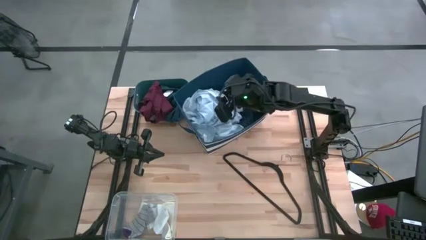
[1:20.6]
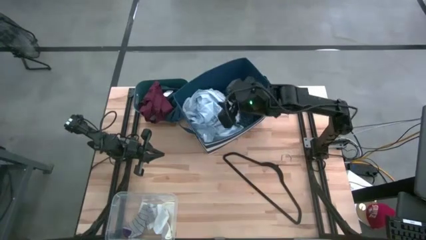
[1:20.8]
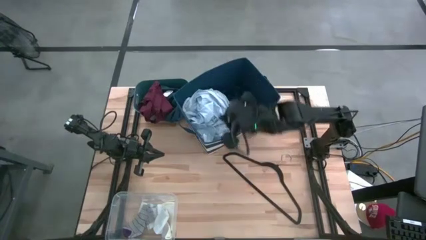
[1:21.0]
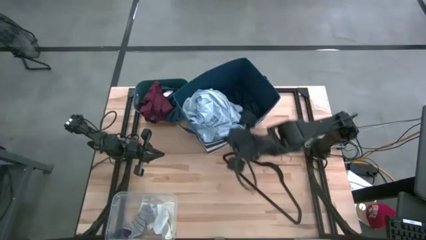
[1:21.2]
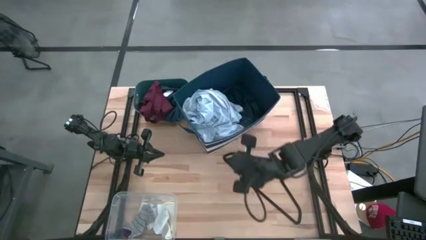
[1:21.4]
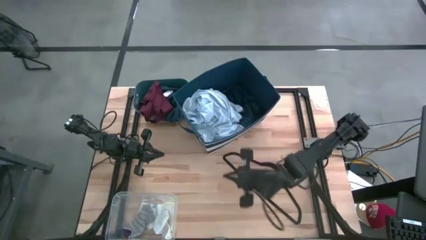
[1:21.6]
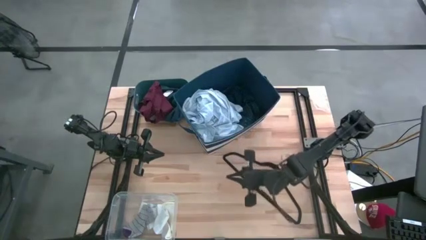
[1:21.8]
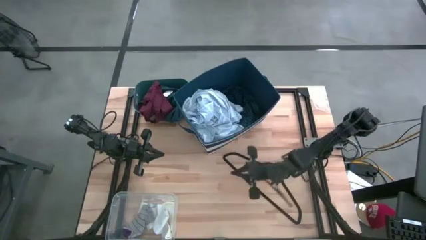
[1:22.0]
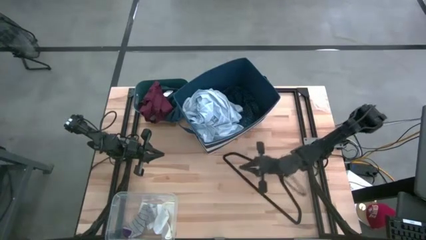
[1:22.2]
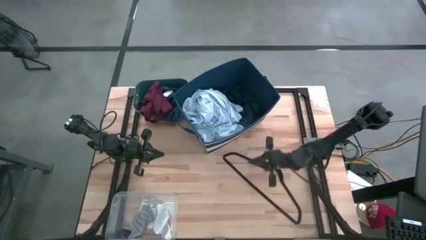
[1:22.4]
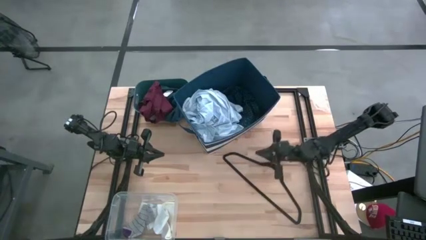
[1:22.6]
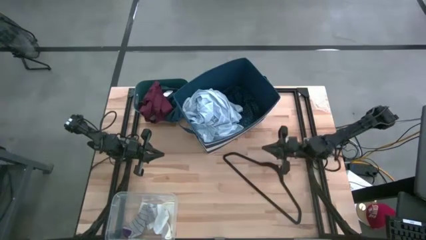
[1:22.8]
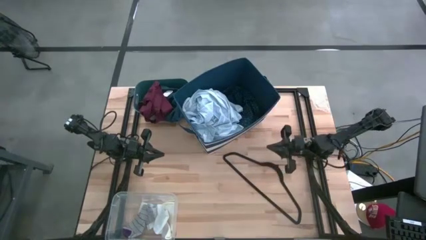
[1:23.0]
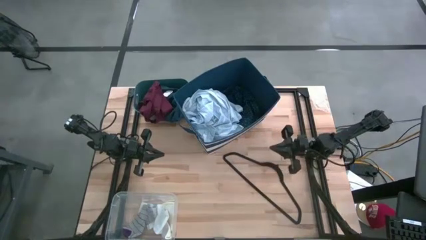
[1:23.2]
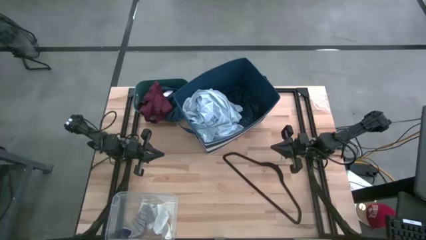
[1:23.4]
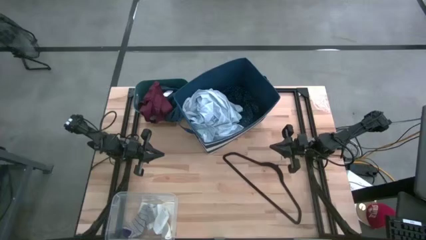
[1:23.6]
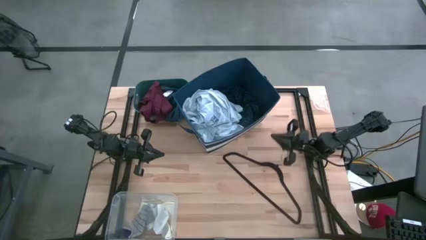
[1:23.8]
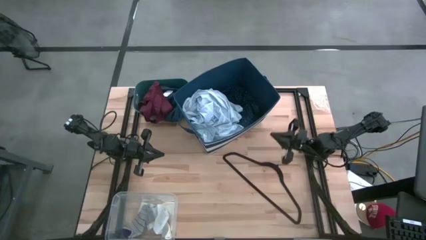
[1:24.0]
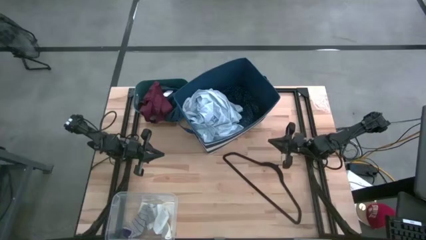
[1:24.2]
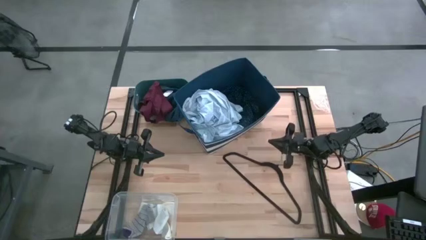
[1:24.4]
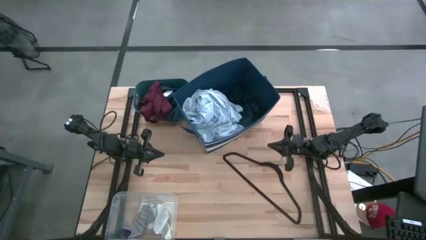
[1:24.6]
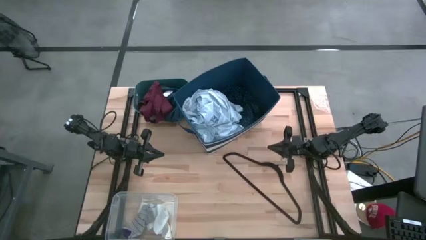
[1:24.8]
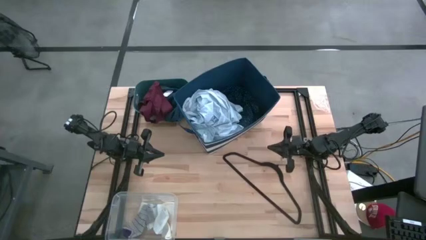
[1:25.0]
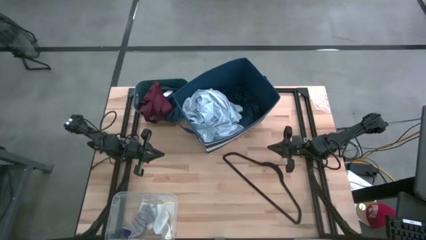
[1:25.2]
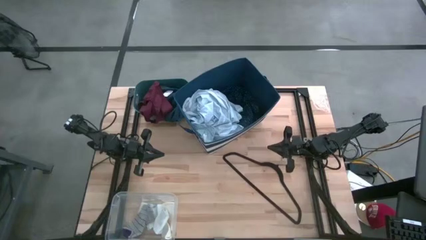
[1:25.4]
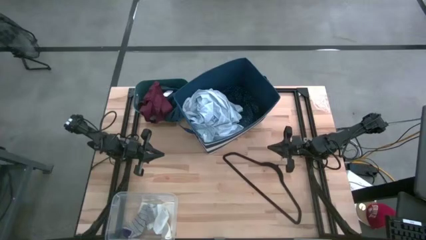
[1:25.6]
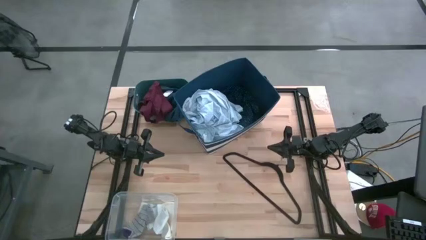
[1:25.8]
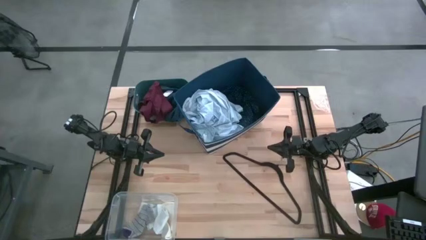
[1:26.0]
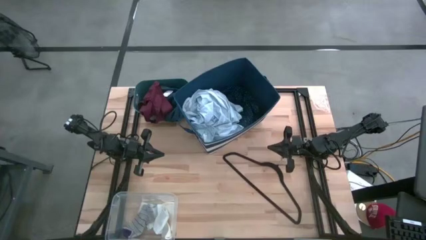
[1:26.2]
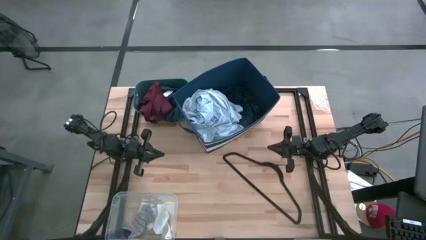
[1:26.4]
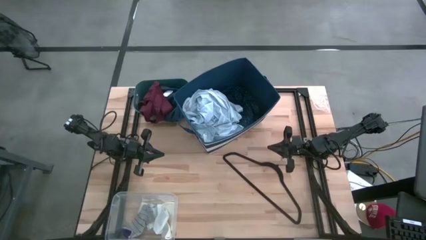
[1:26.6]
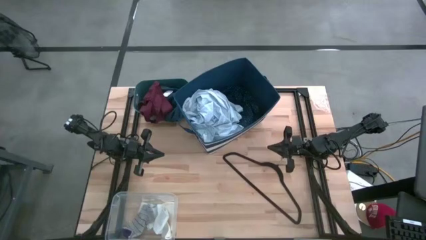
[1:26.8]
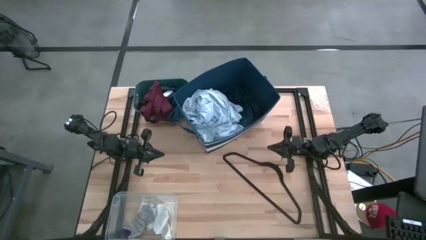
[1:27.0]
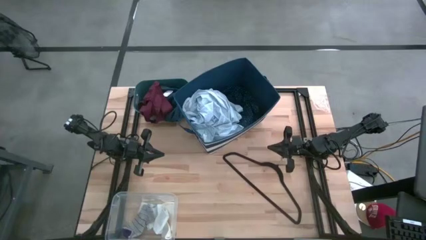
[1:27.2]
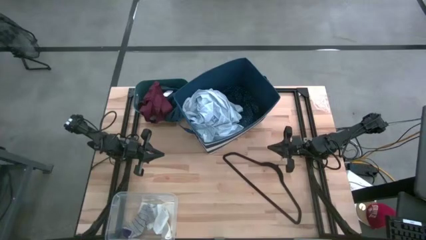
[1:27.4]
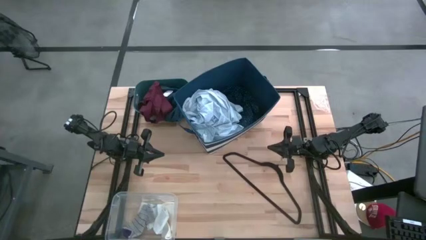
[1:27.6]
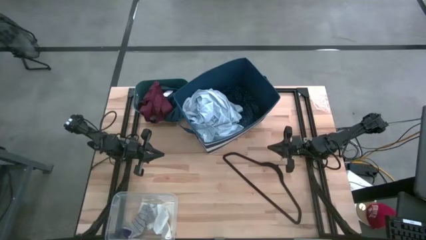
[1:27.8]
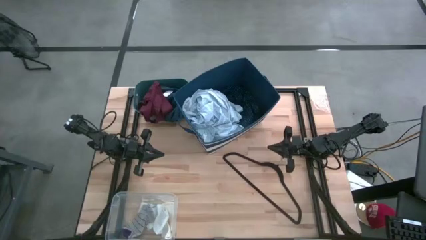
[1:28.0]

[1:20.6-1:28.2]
Task: Pick & Place Cloths
Return to Home Position

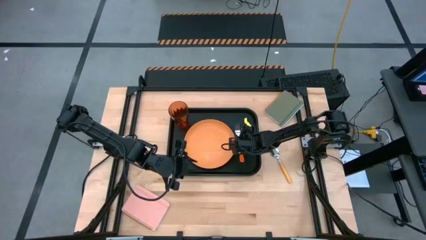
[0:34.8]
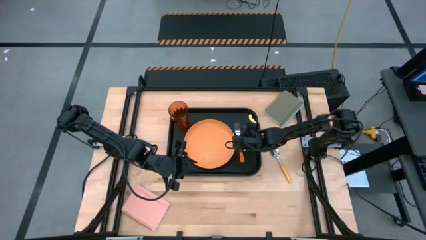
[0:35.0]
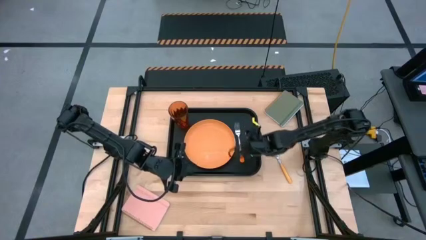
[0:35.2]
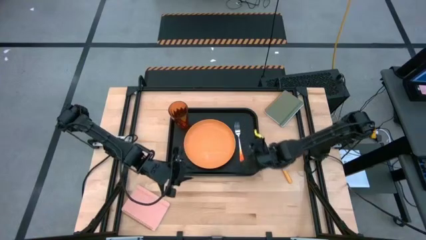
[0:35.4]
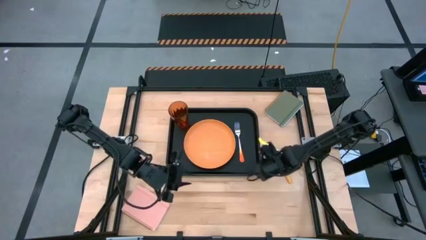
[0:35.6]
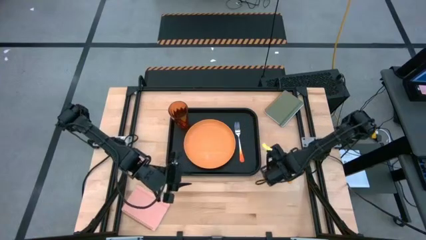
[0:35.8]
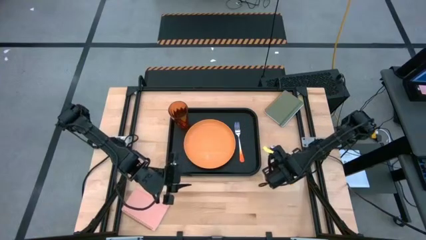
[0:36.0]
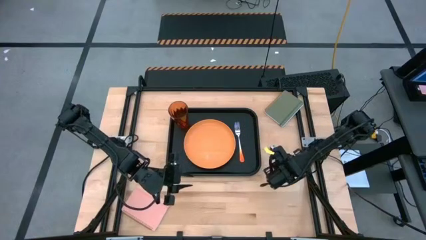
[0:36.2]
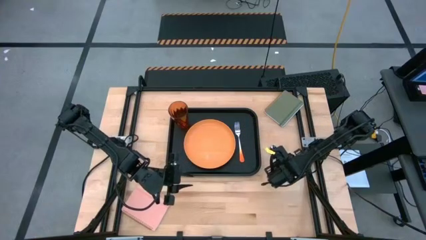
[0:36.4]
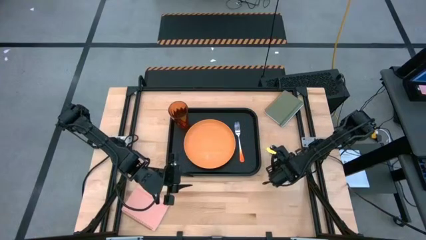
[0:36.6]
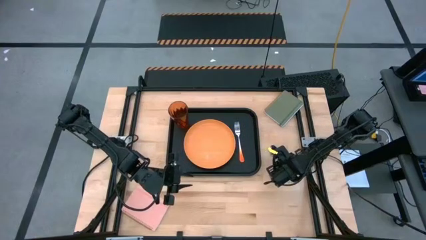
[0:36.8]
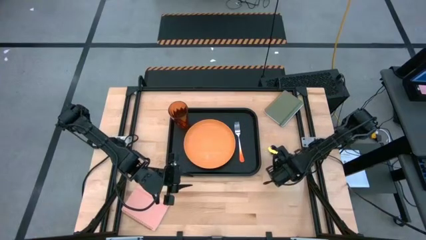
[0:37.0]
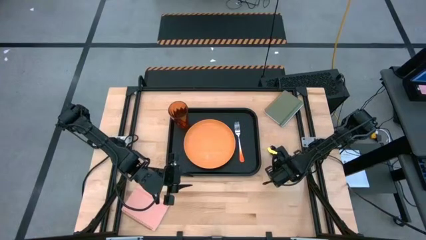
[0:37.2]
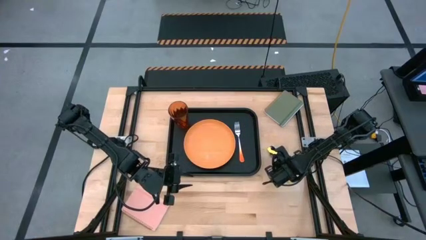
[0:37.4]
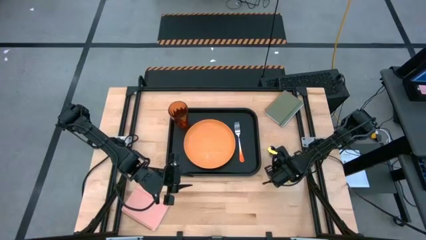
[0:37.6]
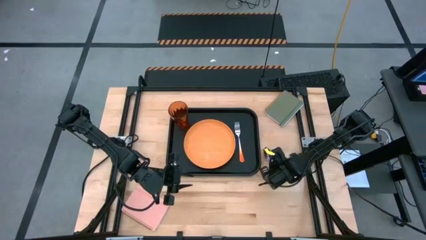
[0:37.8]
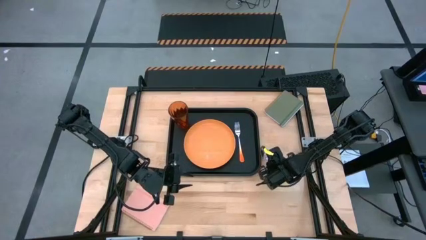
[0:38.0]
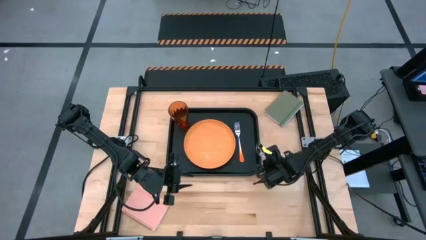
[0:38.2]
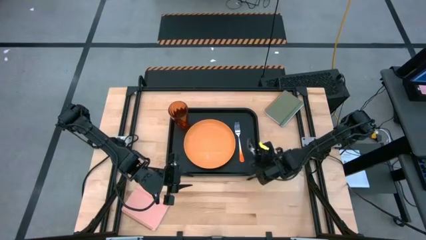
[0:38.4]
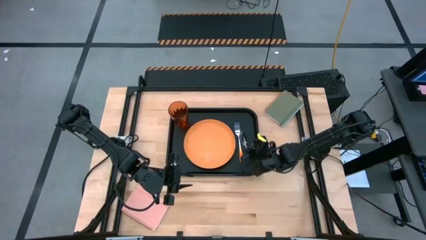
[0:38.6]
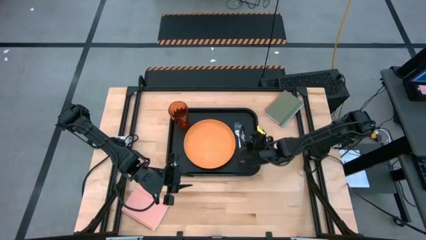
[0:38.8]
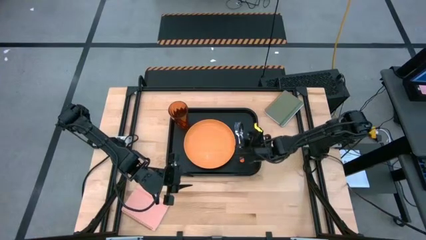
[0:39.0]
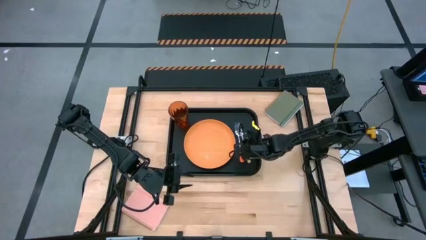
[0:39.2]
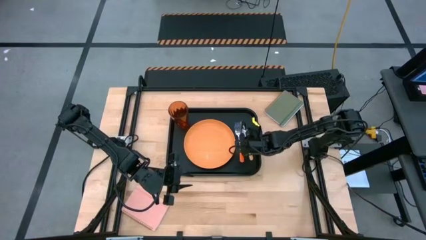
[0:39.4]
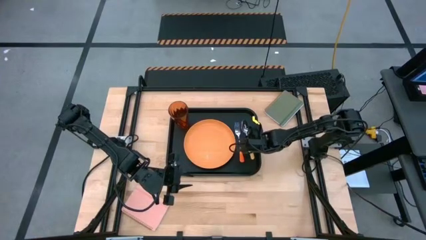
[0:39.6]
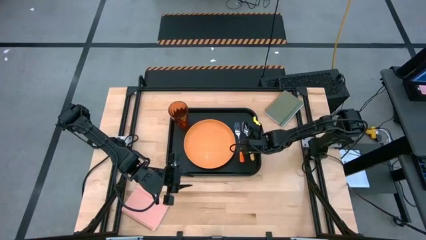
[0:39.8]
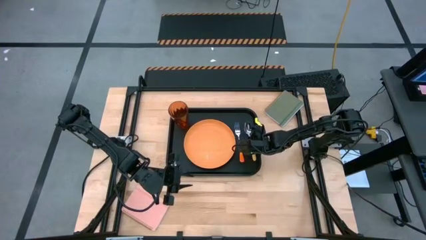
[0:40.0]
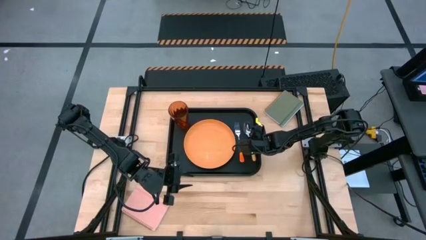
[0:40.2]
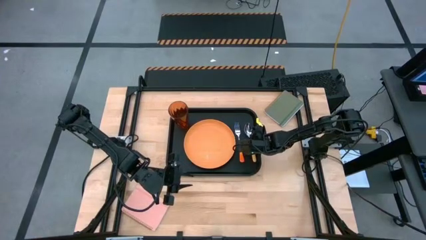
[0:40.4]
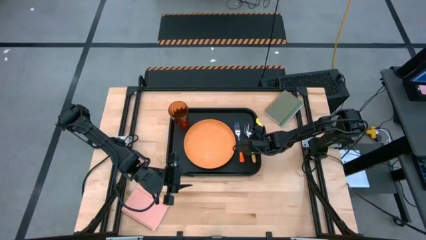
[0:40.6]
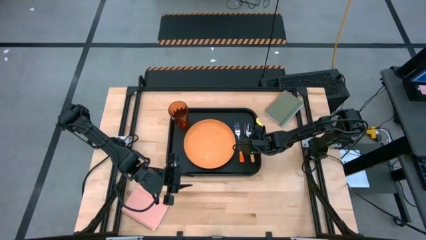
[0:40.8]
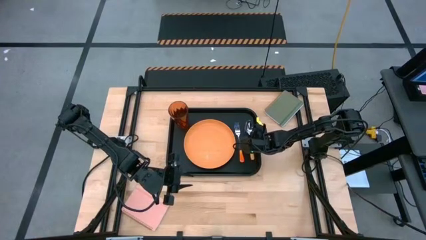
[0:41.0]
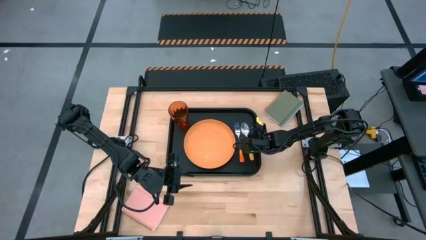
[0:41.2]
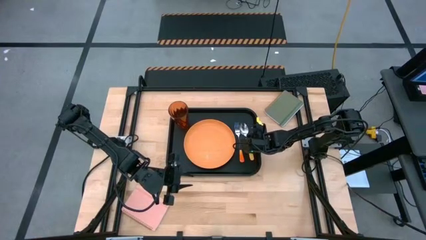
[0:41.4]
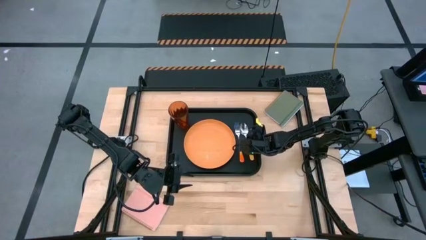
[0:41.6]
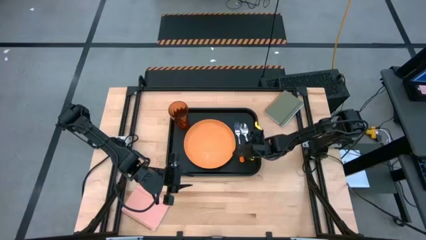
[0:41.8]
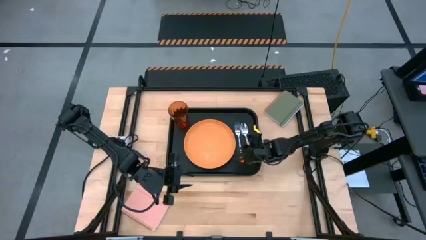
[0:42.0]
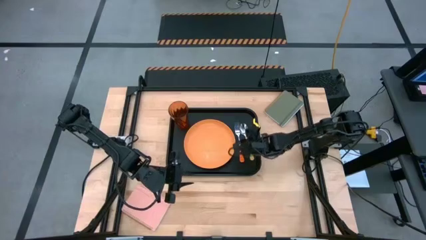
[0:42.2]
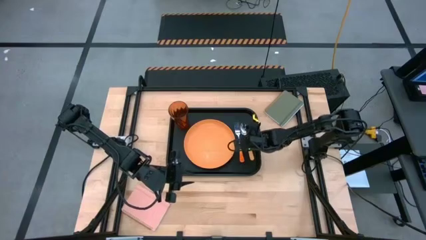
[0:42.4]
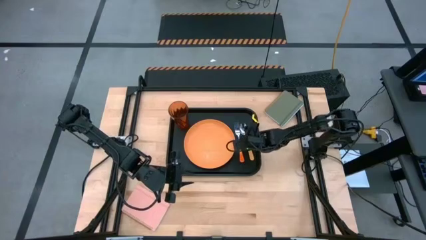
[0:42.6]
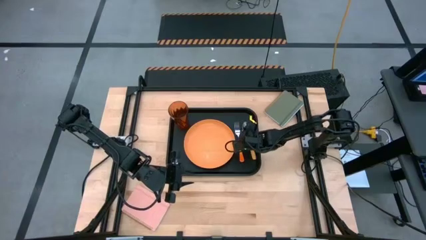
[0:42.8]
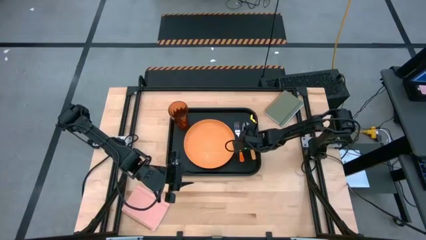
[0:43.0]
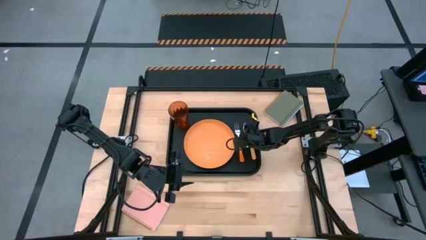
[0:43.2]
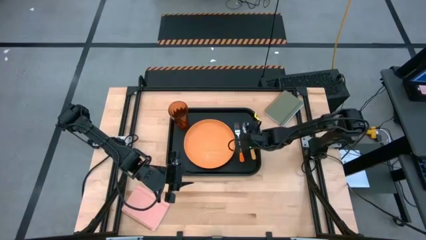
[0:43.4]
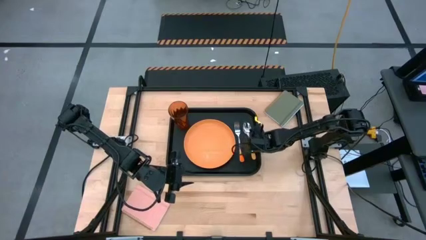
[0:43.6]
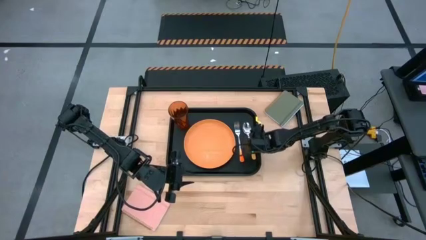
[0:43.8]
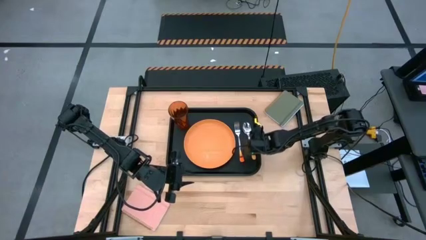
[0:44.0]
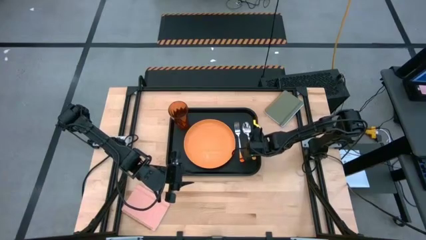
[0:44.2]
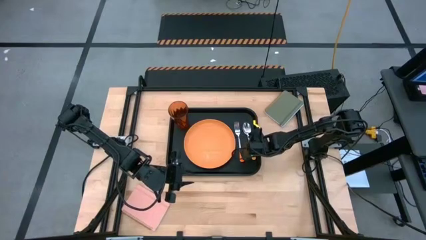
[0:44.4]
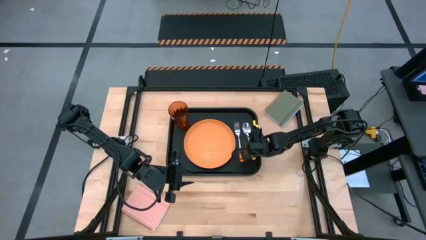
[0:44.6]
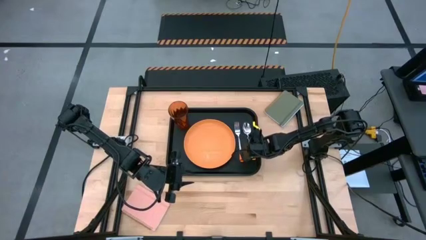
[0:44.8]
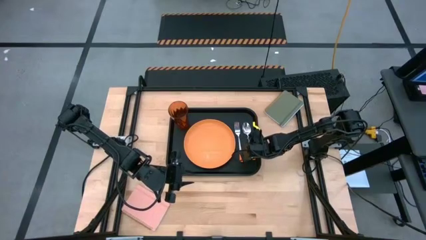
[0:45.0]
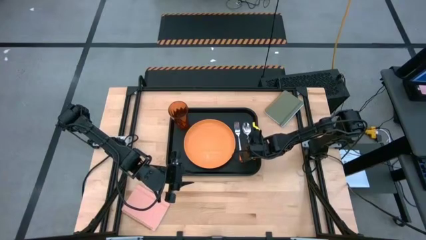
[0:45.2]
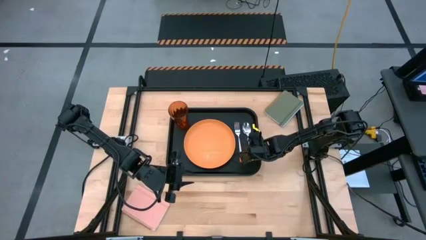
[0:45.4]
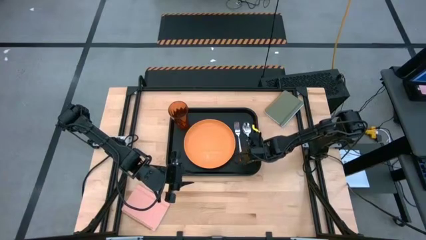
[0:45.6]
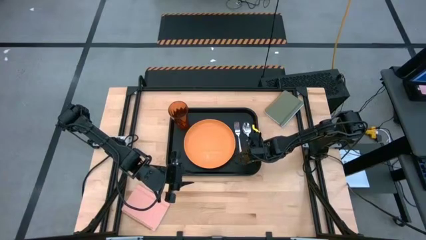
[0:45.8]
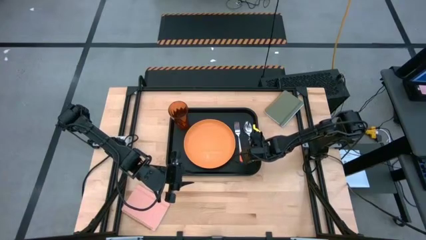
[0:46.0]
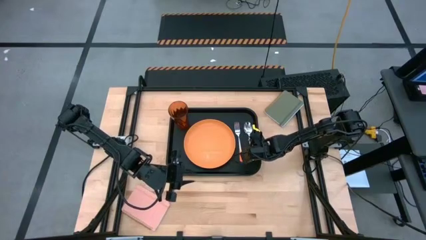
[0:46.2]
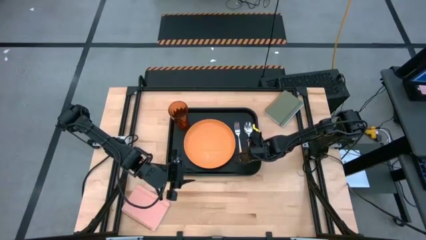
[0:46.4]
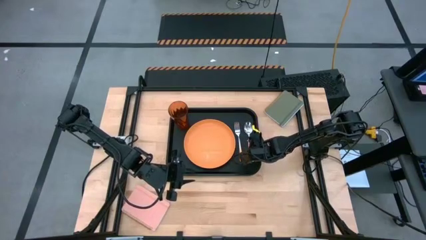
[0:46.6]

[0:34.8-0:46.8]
Task: Pick and place plate/cup/fork/spoon on tray
Put the orange spoon on the black tray to the right side of the orange fork
